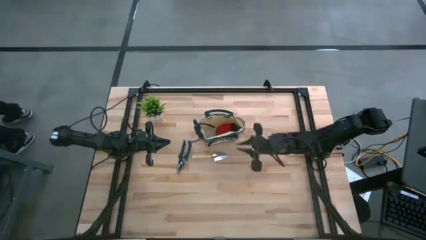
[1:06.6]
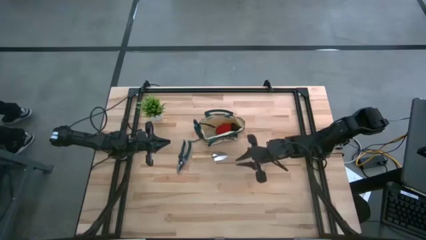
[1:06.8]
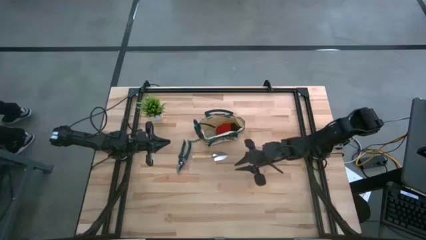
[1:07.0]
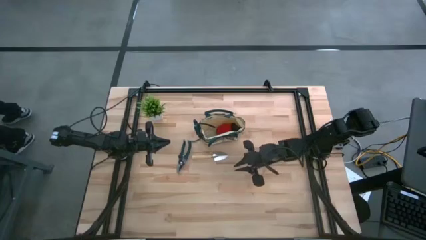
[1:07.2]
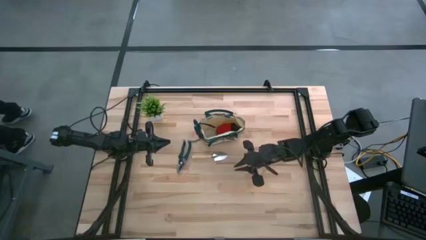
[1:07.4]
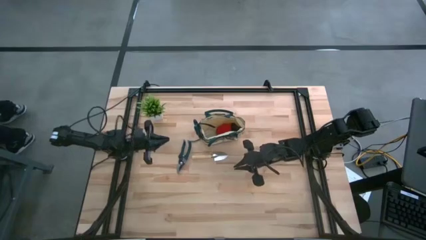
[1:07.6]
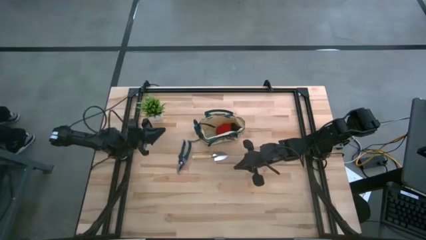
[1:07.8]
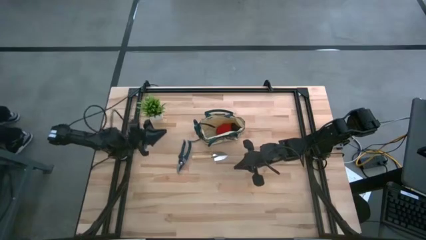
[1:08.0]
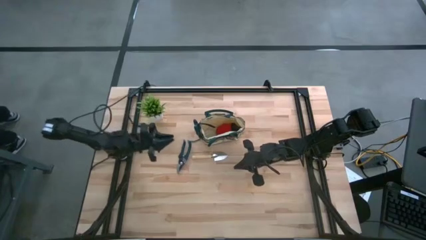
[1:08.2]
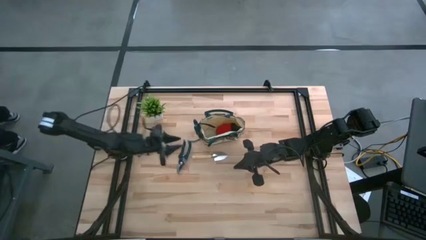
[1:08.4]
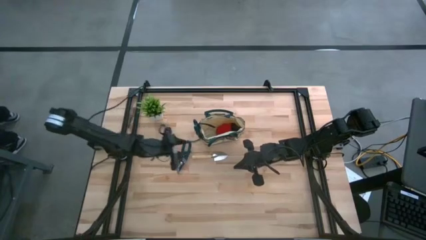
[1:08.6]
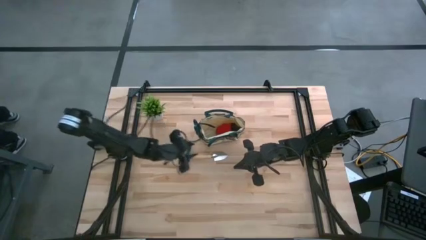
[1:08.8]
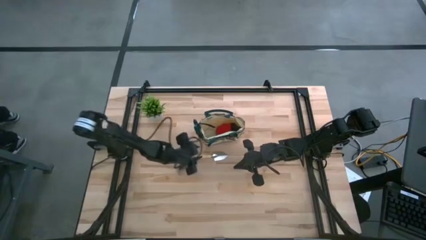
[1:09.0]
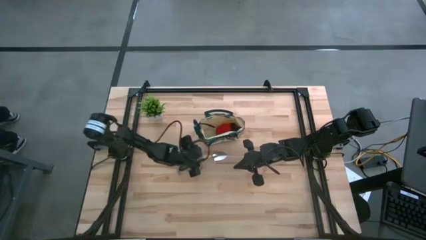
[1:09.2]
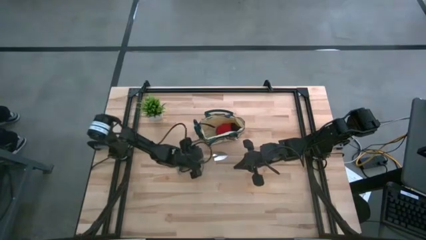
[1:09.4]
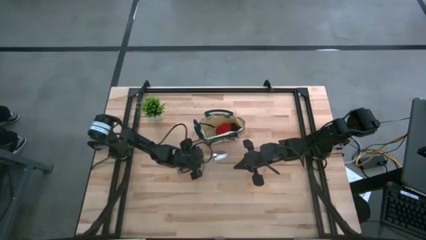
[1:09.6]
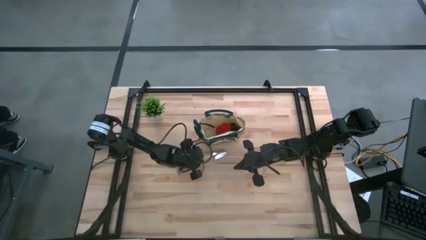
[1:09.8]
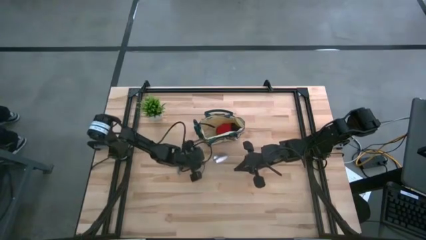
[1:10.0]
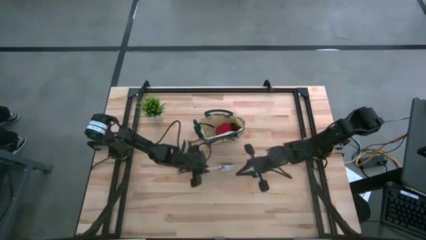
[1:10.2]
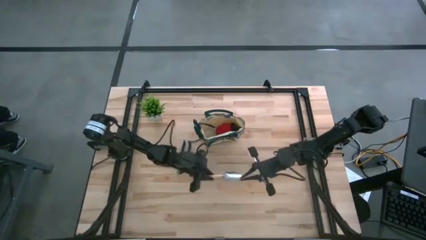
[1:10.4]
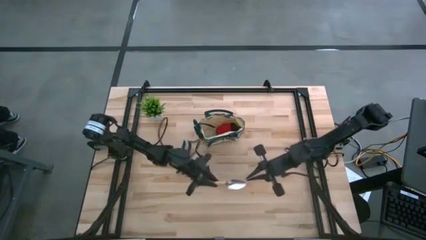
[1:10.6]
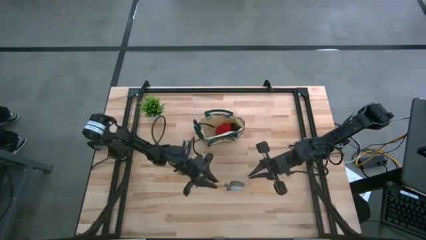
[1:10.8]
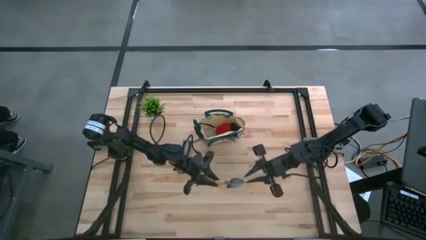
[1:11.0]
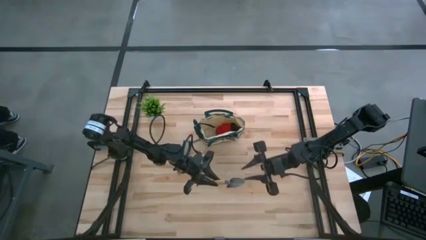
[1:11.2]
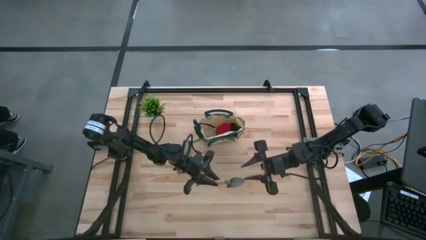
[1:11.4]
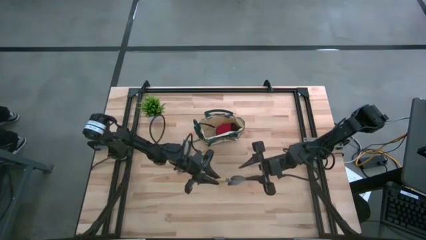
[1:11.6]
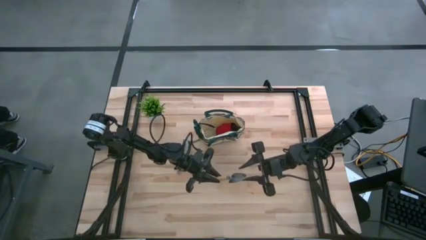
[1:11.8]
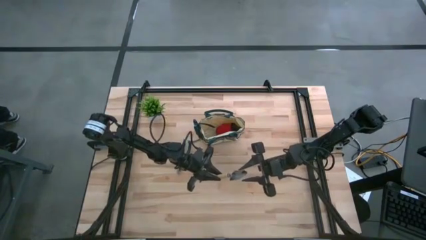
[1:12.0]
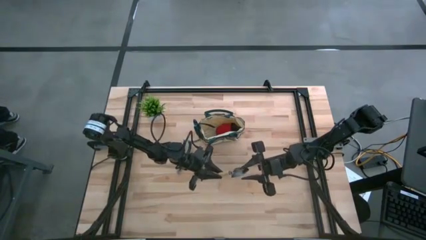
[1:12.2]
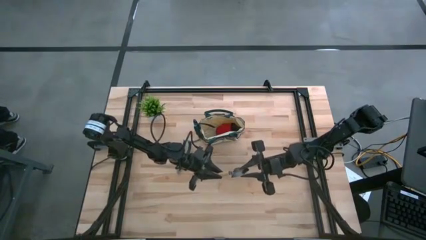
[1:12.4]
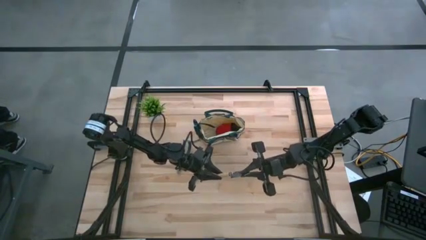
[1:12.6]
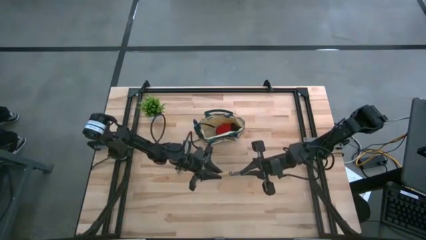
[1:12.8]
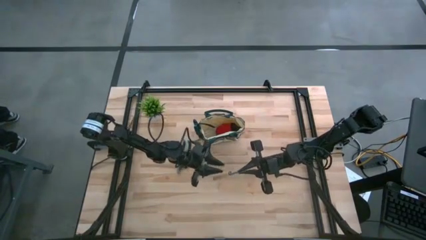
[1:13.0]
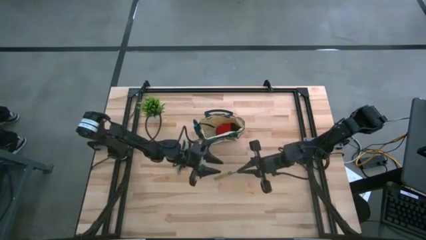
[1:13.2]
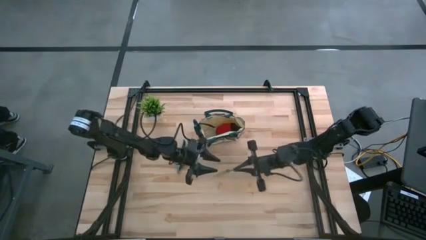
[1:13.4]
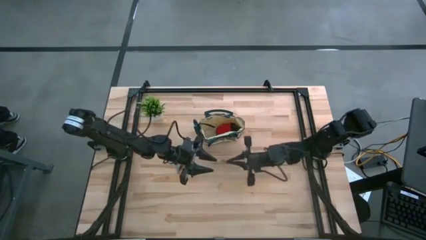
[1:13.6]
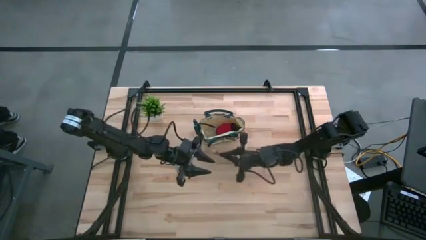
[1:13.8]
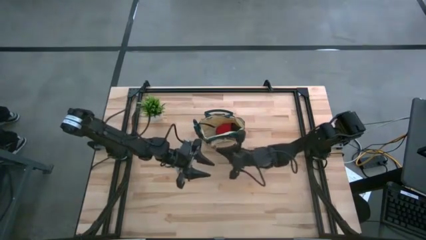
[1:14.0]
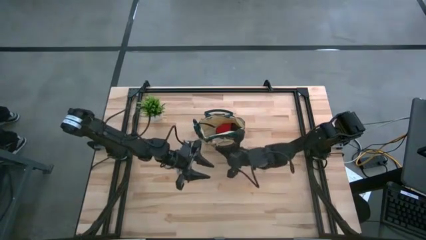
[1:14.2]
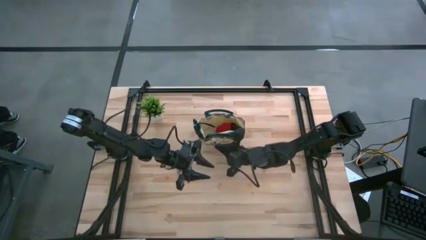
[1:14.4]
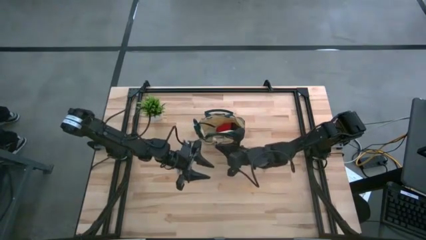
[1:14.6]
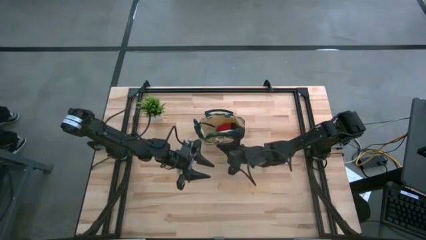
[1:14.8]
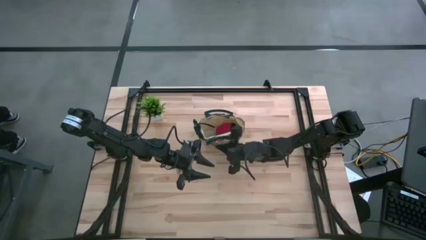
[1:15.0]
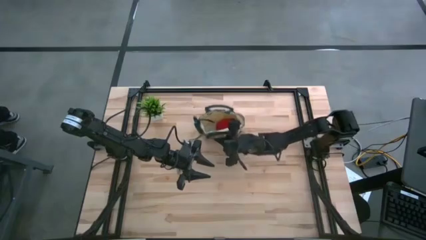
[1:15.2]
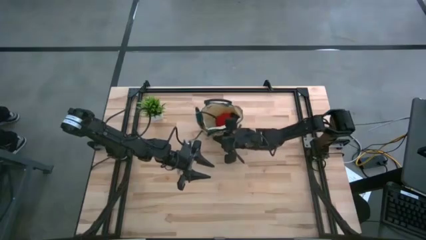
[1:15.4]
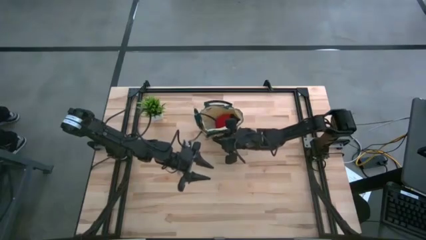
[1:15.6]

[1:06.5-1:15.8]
Task: Pick & Place Garden tools in Gardening bag
Put the brown trowel into the green bag

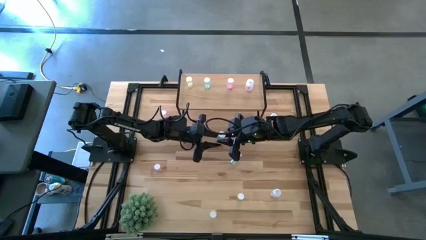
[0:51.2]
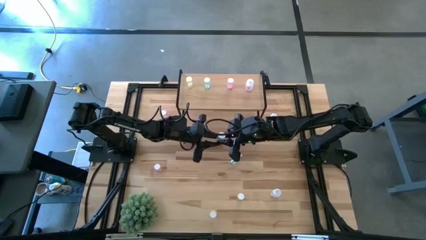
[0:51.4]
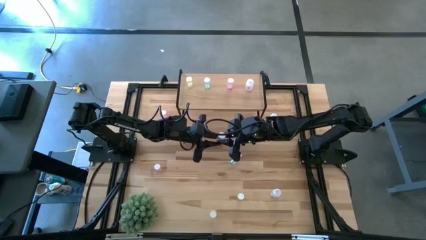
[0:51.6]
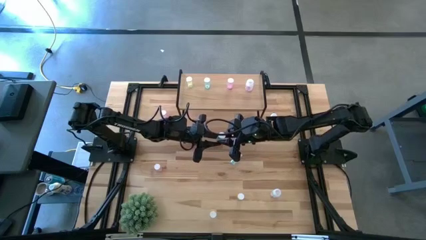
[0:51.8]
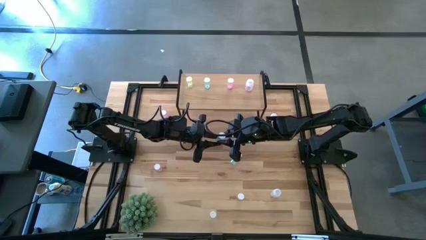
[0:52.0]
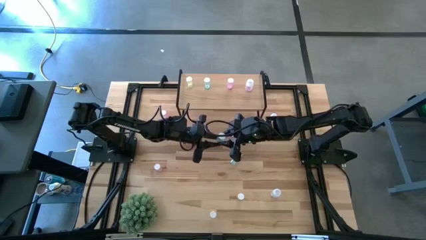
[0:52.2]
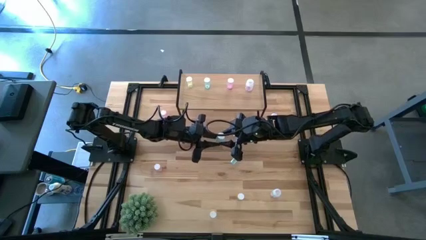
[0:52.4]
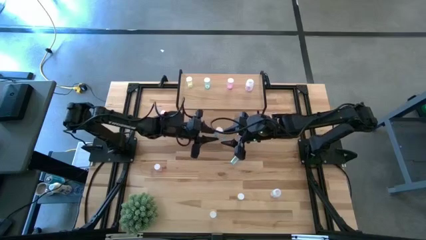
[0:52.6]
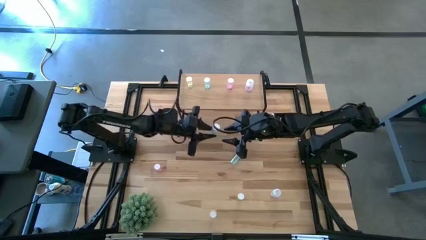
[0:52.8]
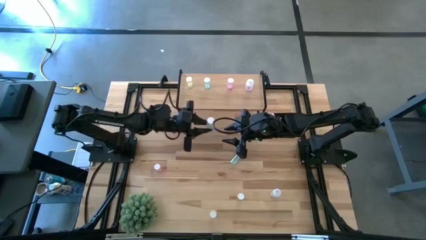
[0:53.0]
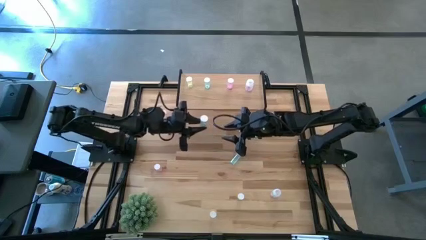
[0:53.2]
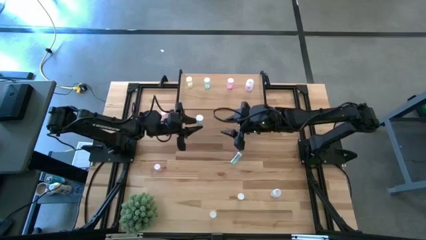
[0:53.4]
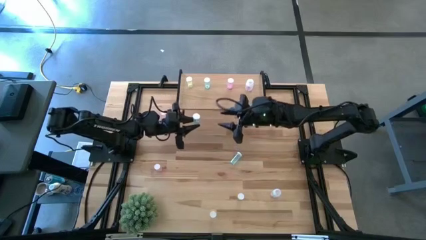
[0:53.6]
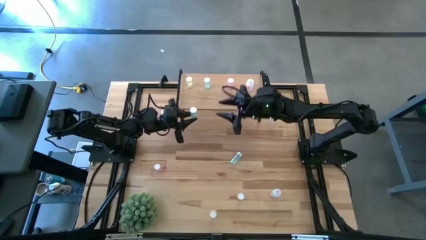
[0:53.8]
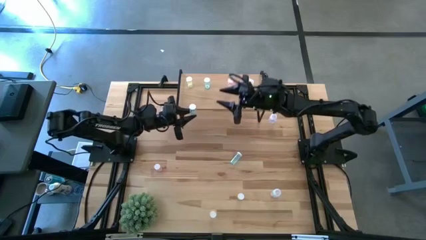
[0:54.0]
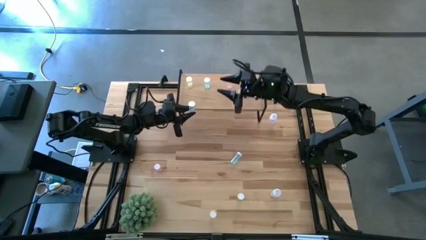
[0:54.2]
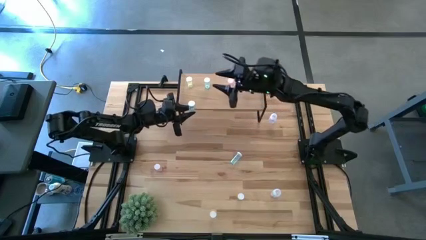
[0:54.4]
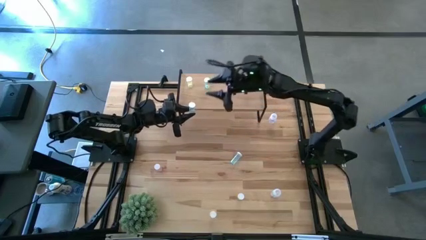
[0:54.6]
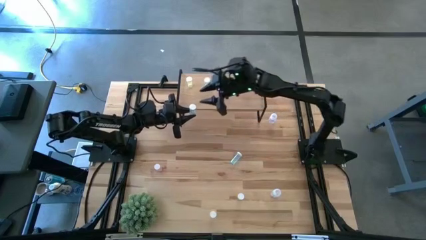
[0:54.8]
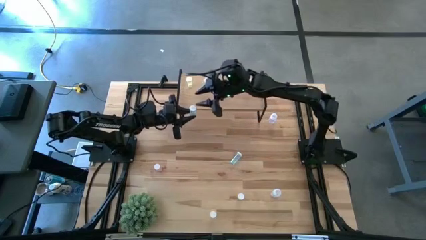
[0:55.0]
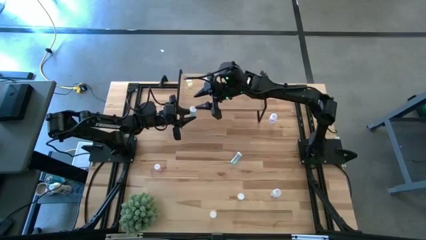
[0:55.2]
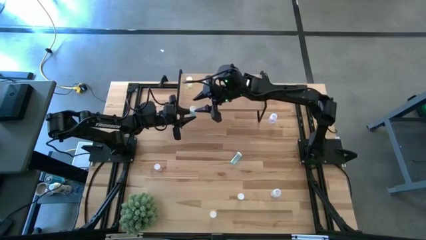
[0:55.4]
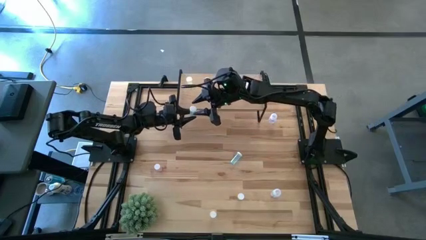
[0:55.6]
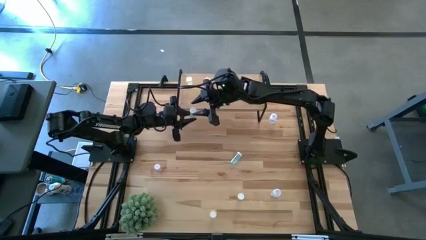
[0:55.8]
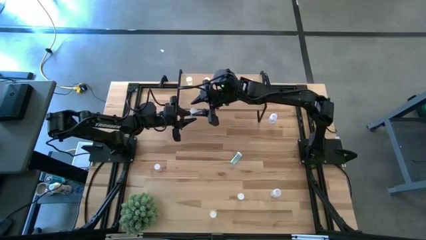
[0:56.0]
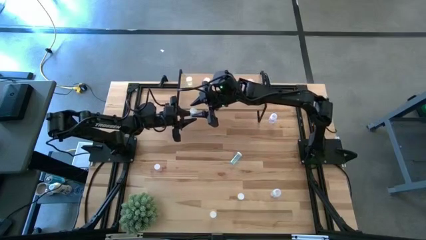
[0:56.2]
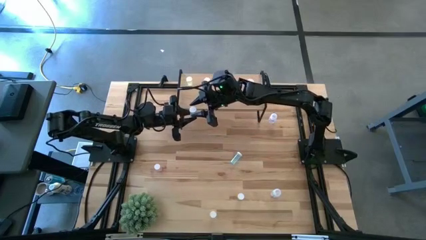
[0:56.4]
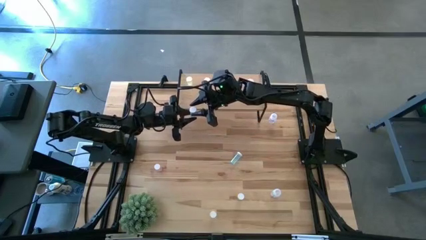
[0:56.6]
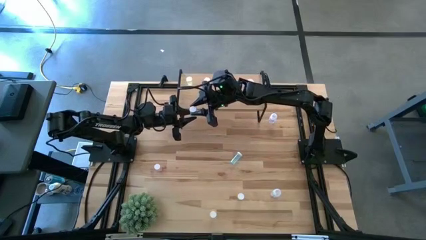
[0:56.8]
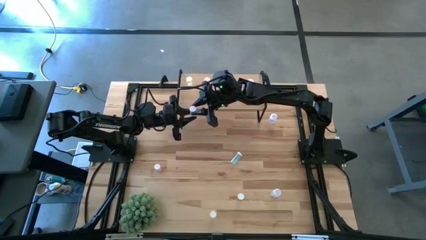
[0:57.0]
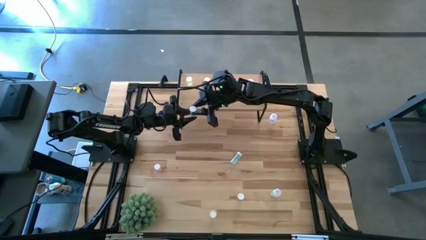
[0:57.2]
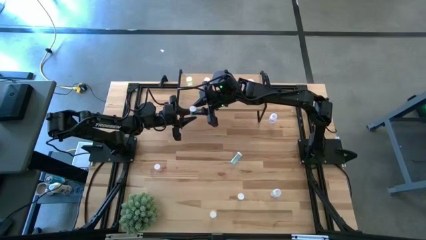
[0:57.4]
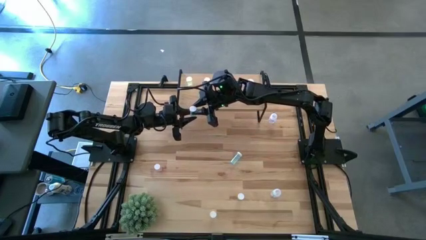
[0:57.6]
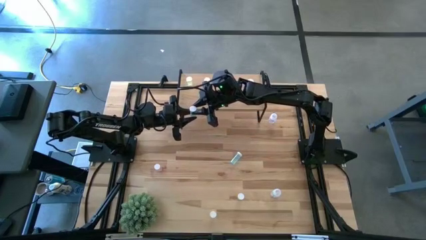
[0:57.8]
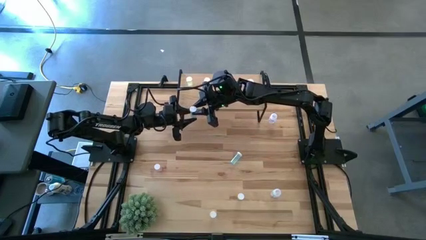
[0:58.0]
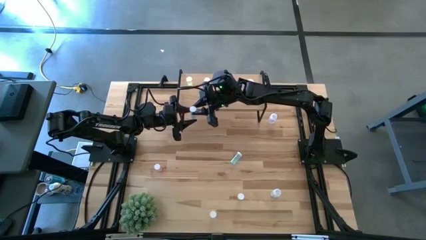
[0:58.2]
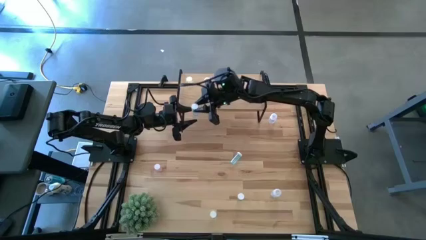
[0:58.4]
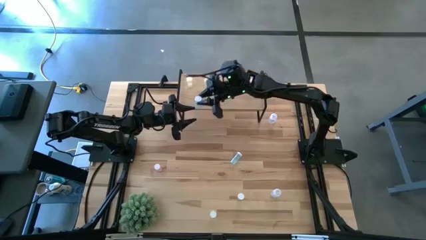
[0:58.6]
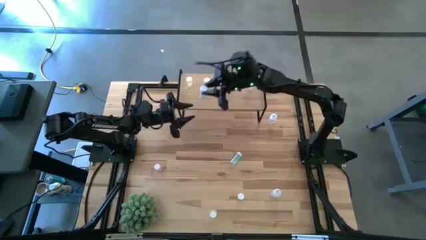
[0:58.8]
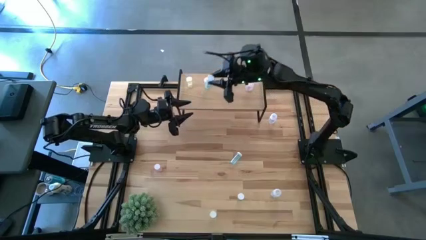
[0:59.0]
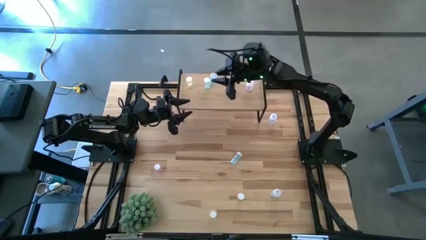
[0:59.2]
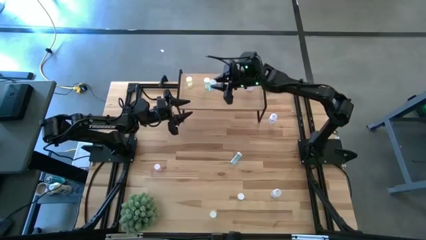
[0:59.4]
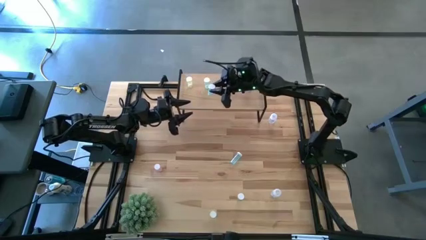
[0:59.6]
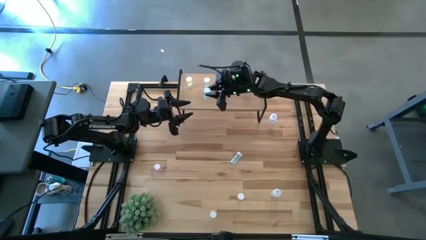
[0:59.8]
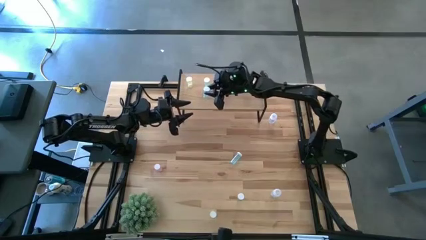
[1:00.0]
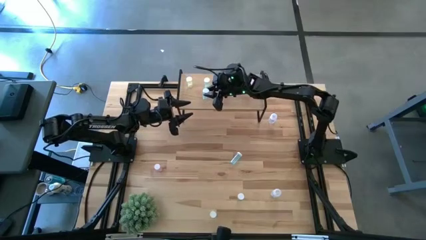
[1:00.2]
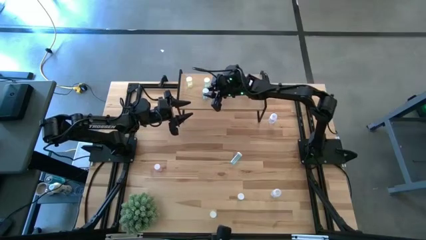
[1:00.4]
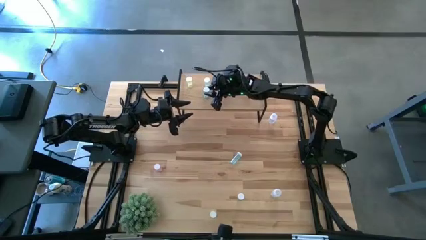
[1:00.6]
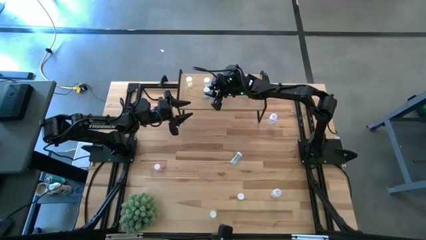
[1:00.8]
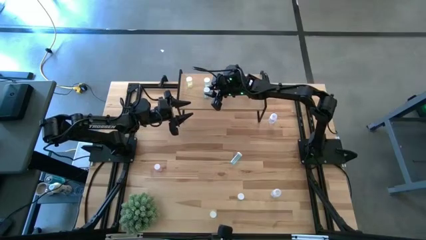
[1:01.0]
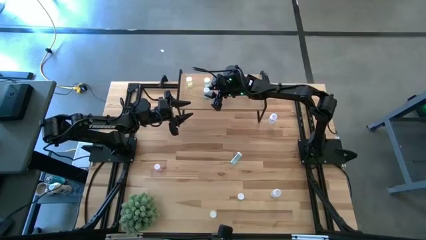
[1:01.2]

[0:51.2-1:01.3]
Task: Pick and place medicine bottles onto shelf by color
Put the right blue pill bottle and align it with the other blue pill bottle on the shelf
